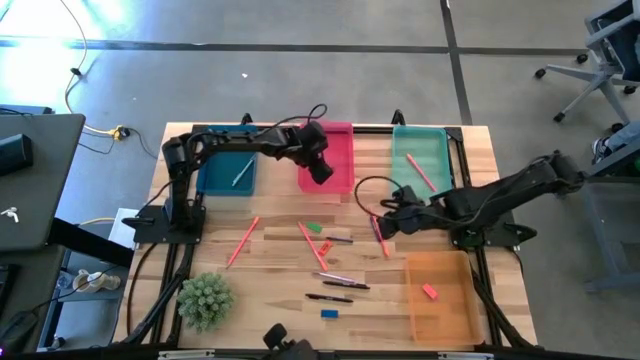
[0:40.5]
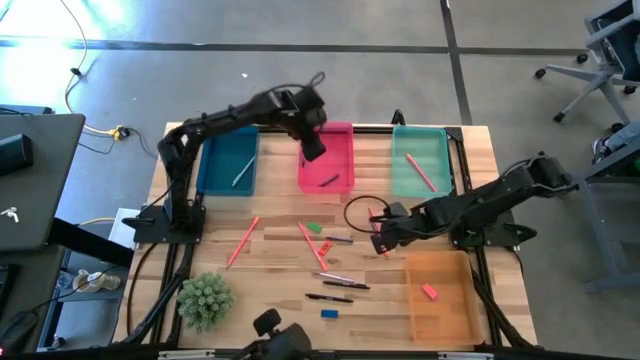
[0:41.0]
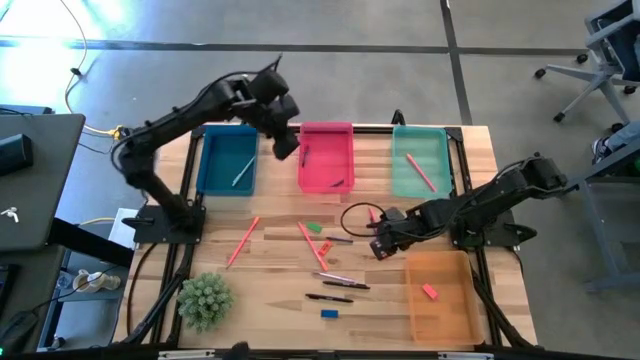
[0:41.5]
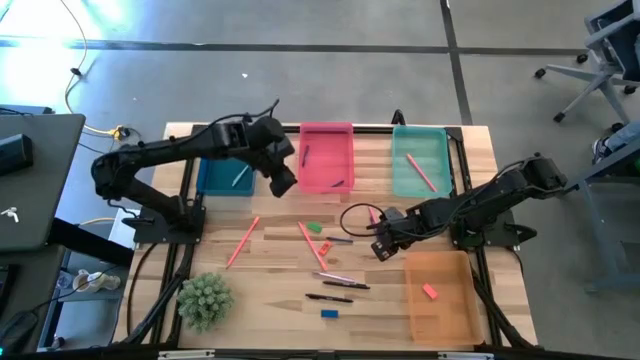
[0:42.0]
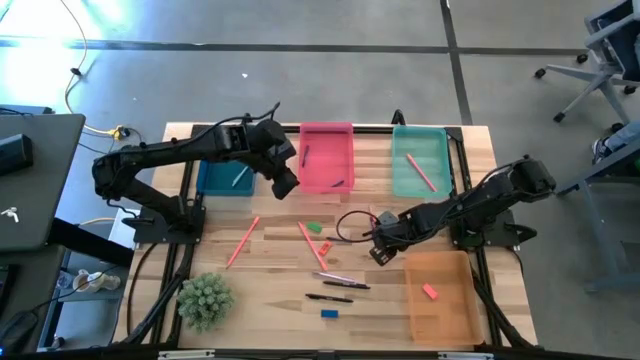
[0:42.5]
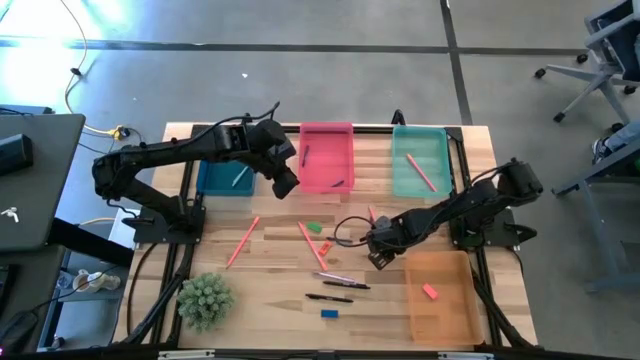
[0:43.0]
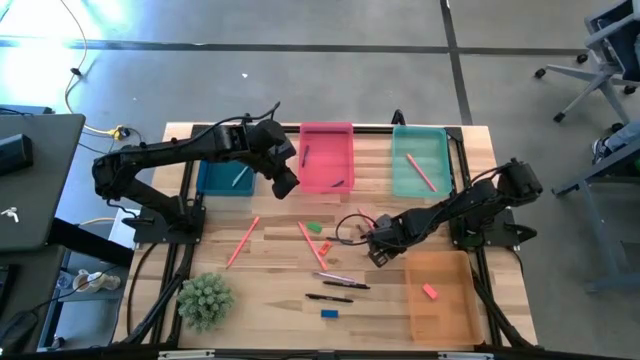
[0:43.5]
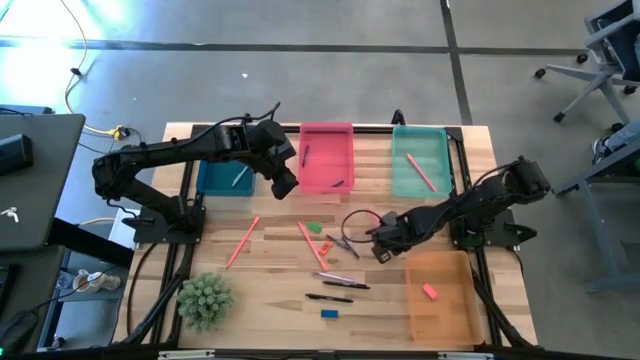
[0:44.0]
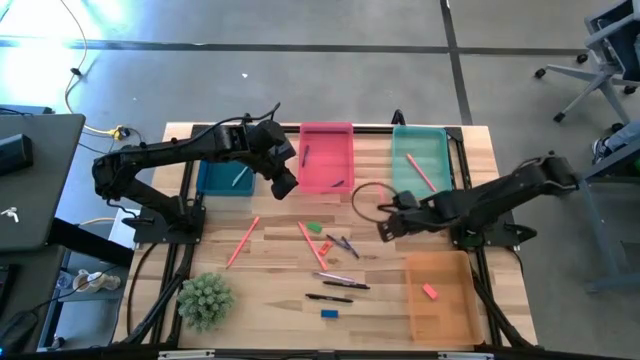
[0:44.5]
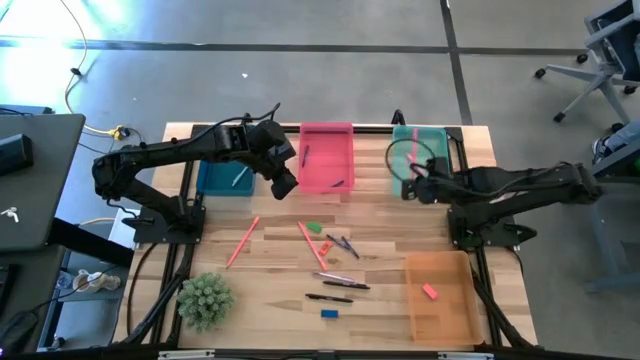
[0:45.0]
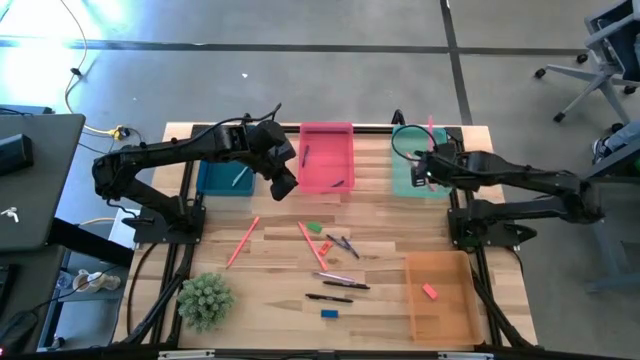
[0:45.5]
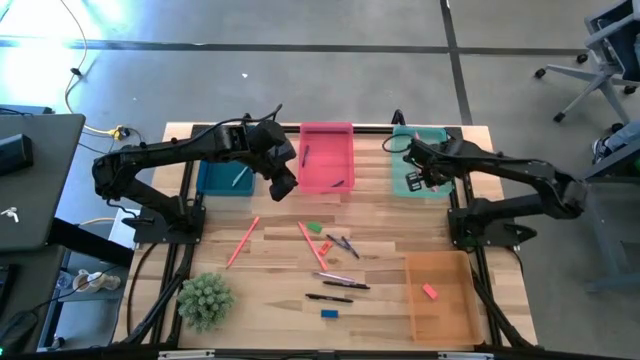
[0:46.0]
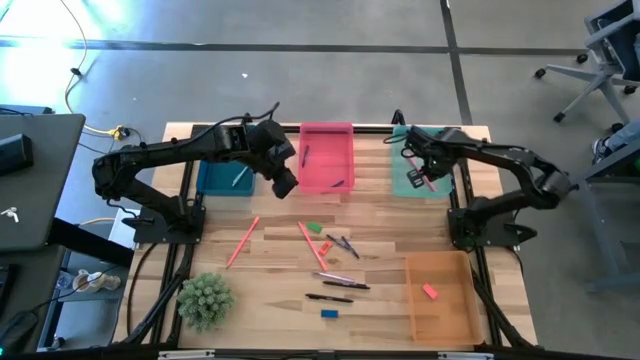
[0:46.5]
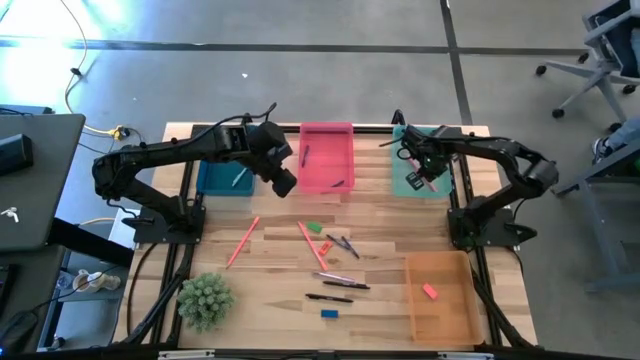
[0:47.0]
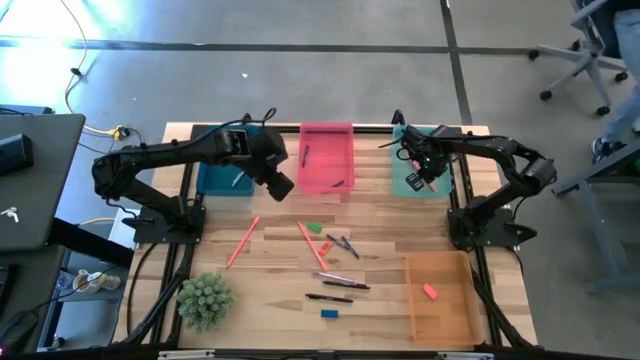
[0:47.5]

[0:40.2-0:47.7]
Task: Sort crayons/erasers/pens/pencils in bins
Put the pink pencil into the green bin

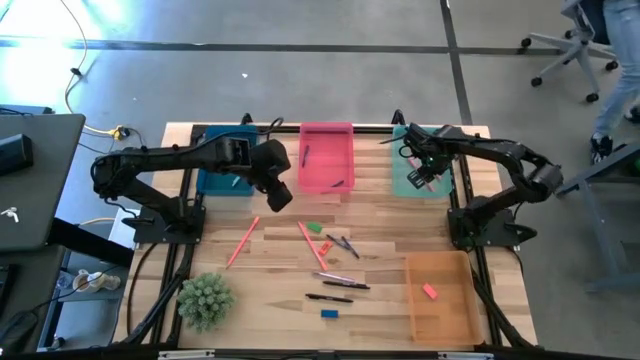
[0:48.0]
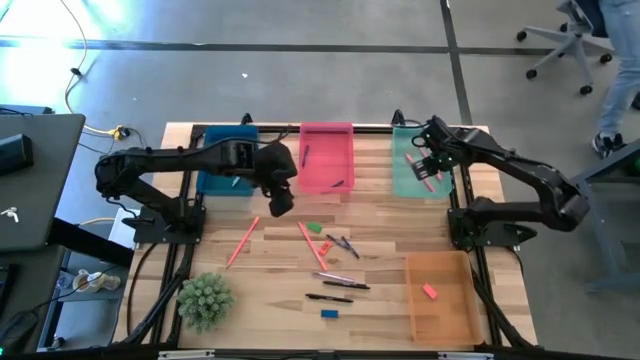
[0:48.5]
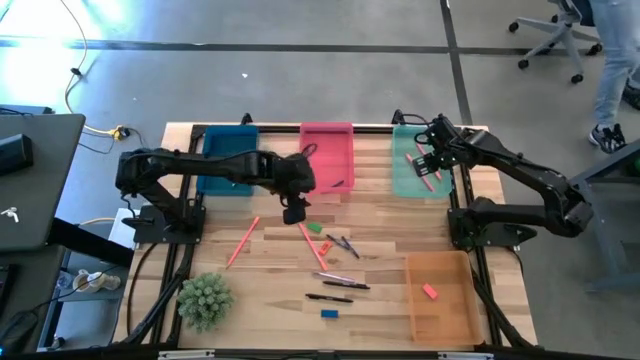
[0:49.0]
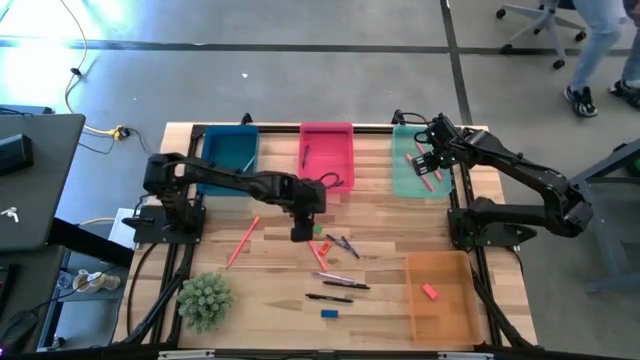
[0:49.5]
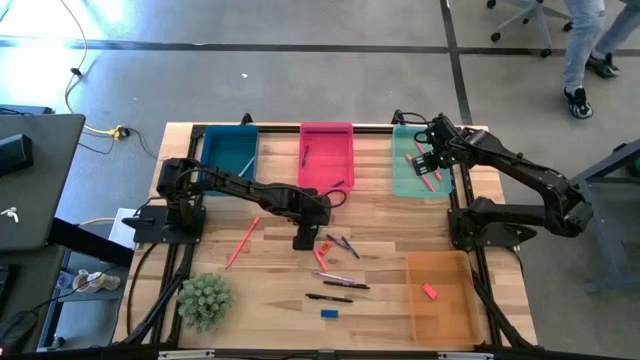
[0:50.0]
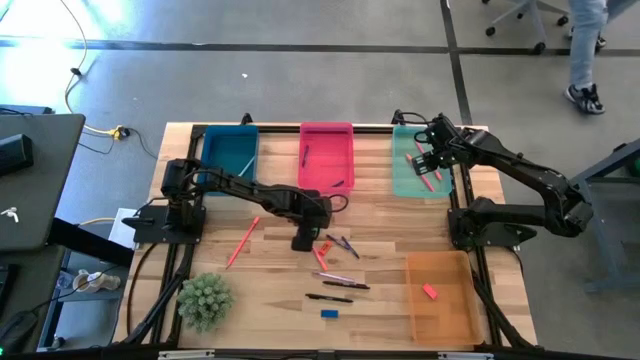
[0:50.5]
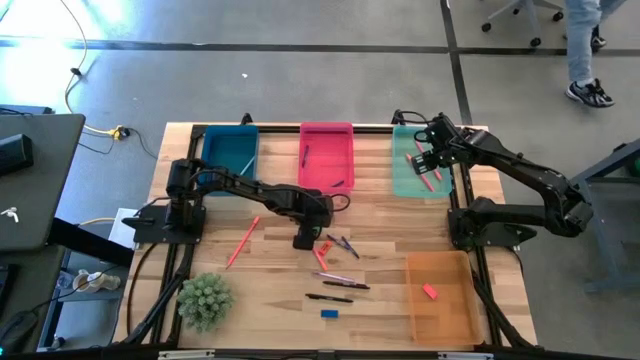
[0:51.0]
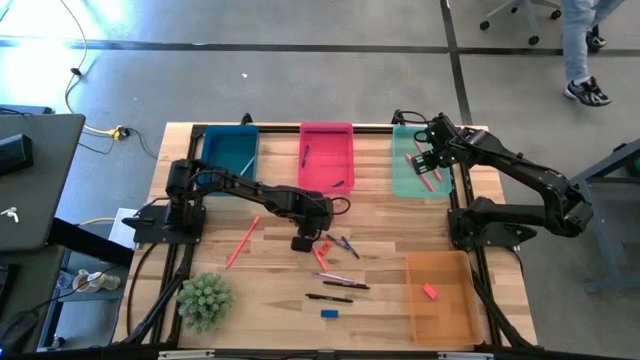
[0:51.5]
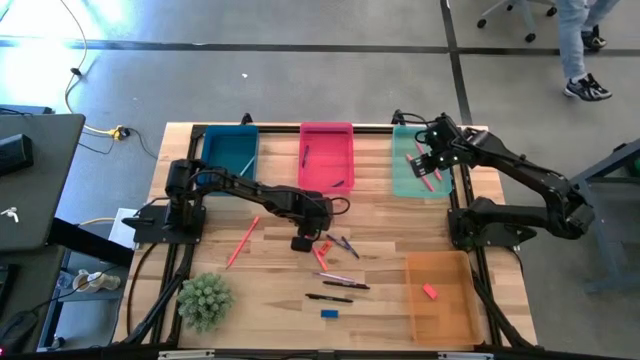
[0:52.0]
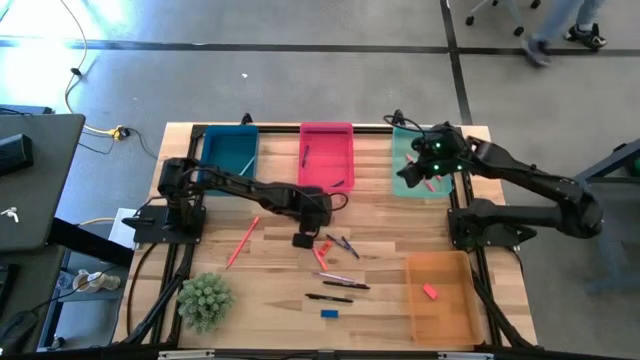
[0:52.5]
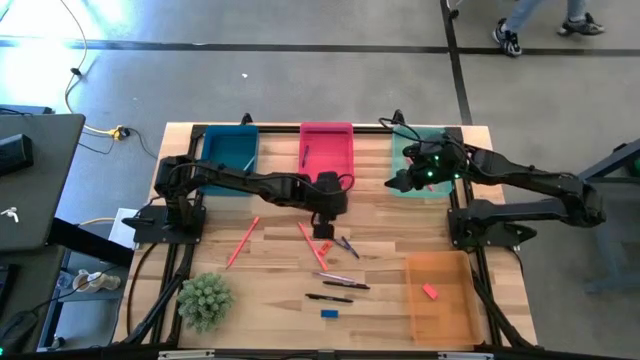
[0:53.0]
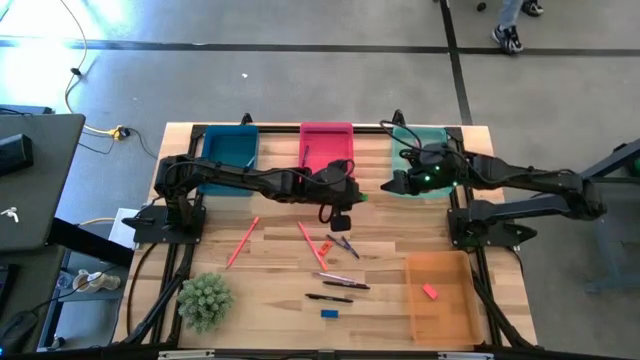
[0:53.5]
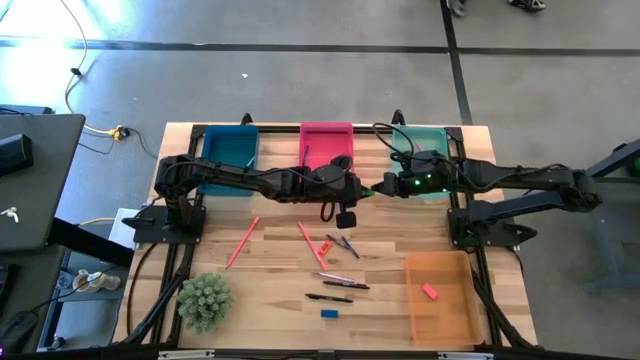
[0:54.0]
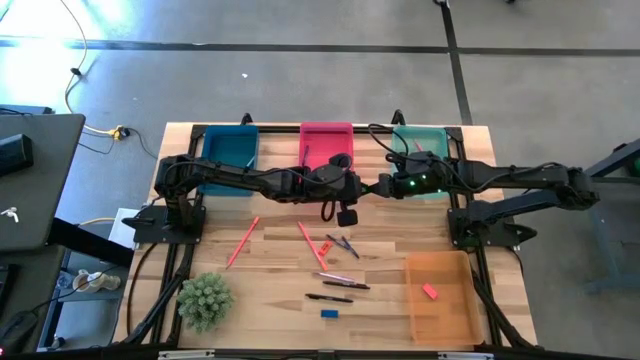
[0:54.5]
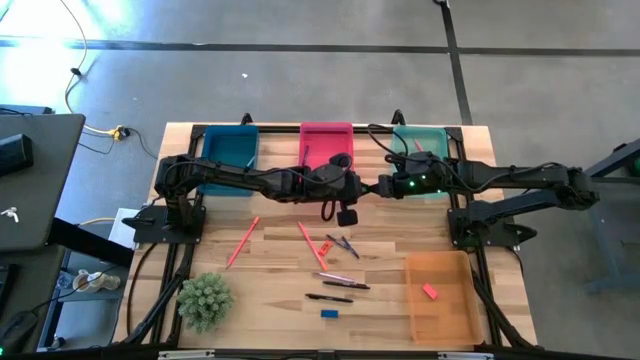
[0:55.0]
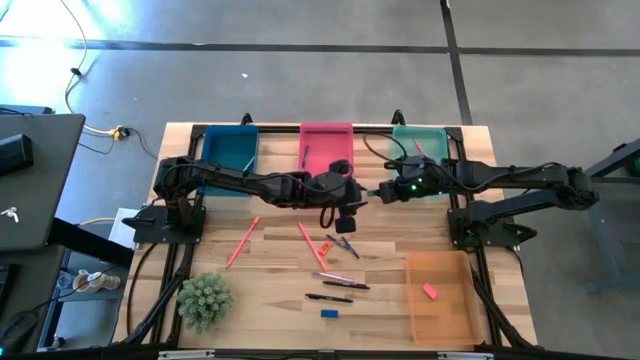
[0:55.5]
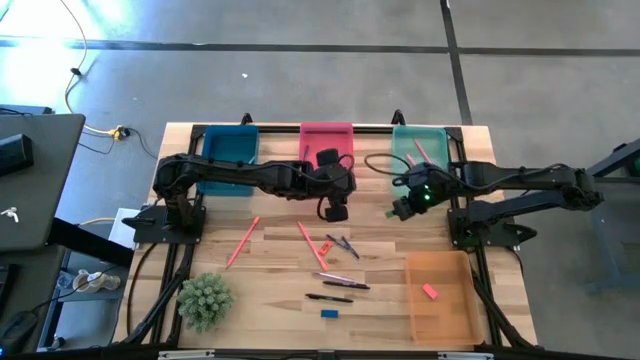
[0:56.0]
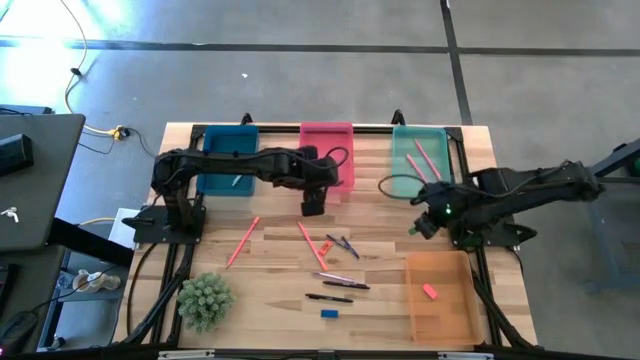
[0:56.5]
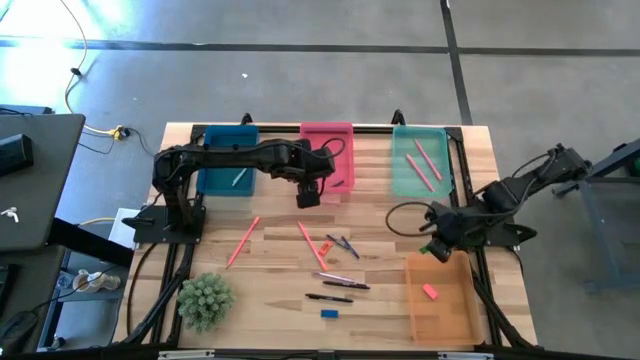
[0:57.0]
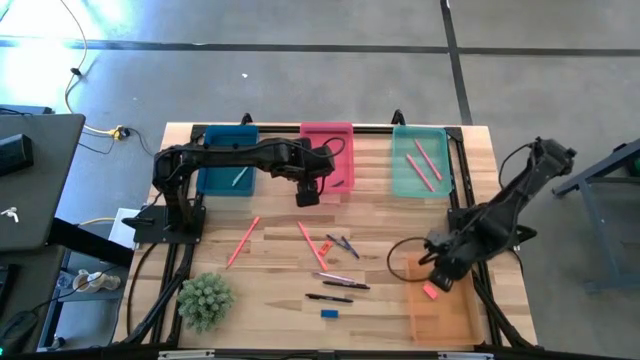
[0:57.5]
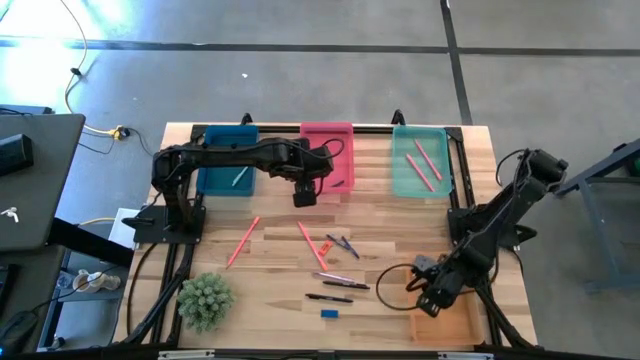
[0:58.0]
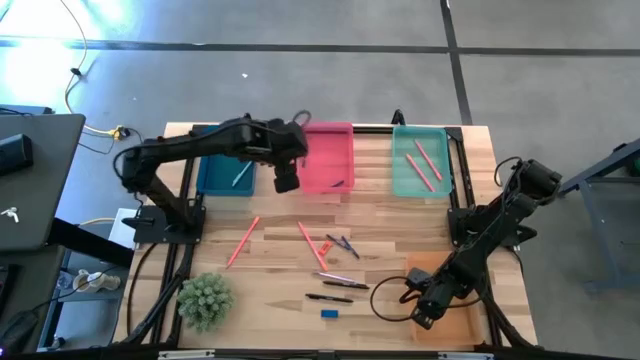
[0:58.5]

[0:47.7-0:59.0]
Put the green eraser into the orange bin

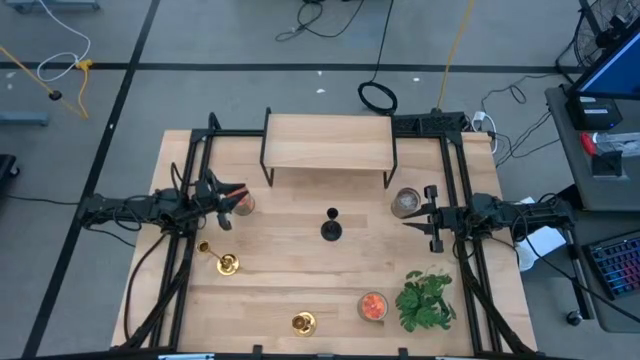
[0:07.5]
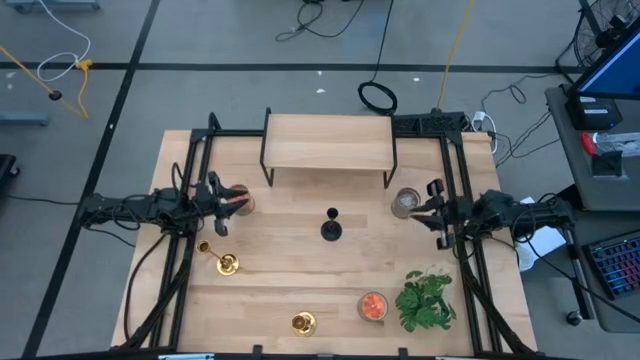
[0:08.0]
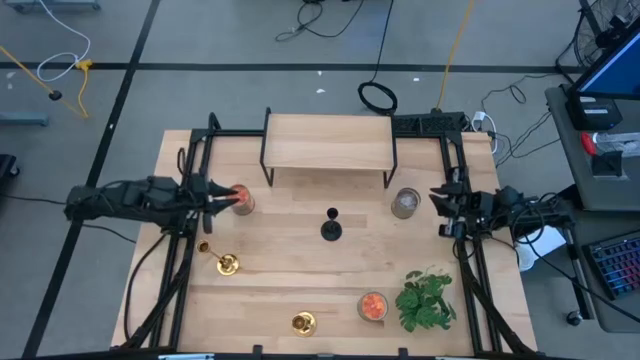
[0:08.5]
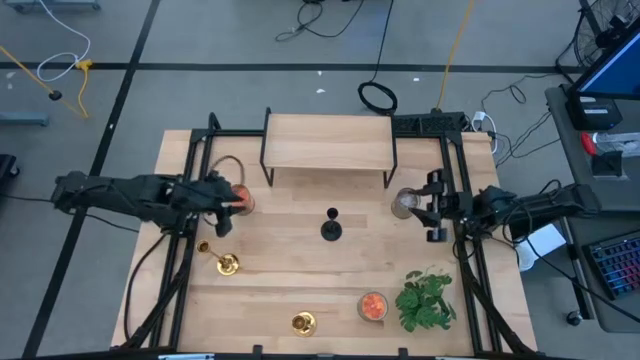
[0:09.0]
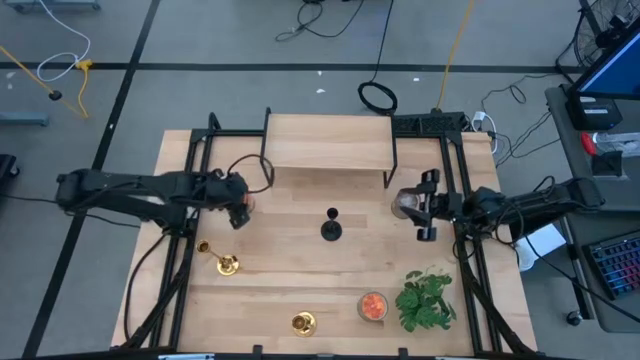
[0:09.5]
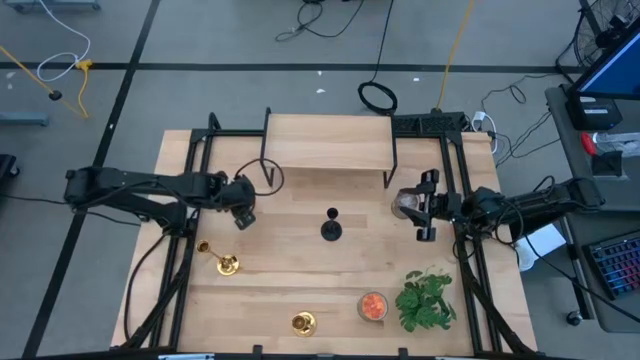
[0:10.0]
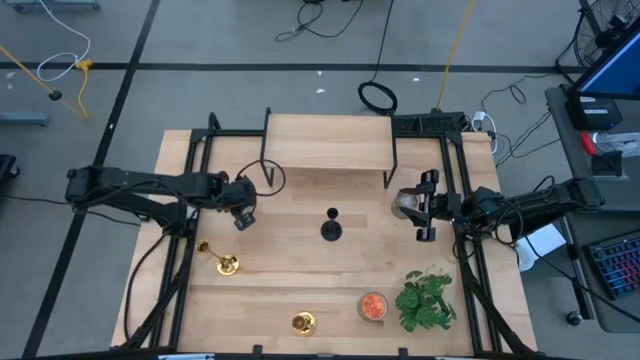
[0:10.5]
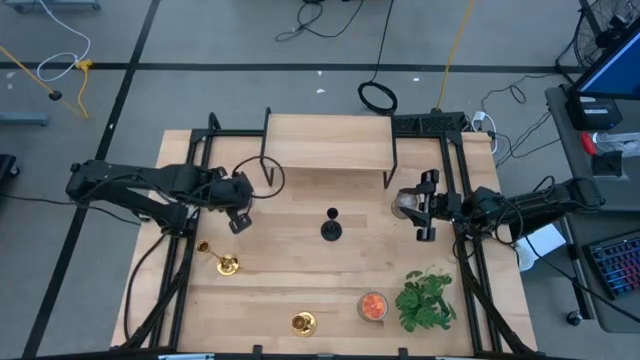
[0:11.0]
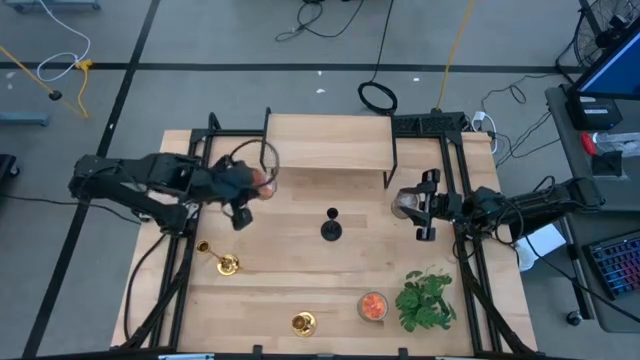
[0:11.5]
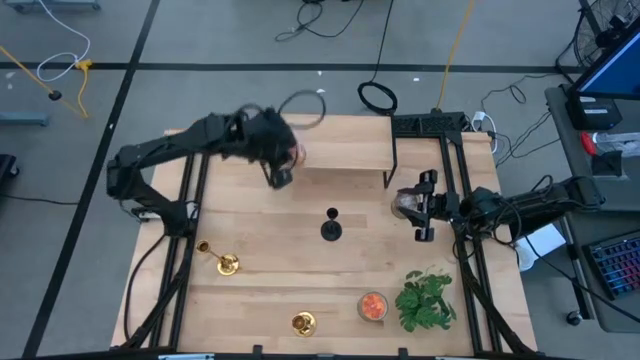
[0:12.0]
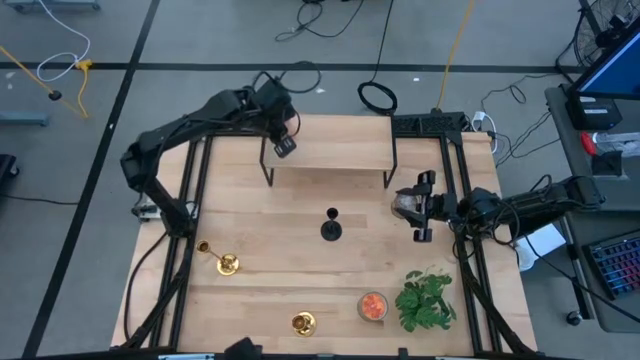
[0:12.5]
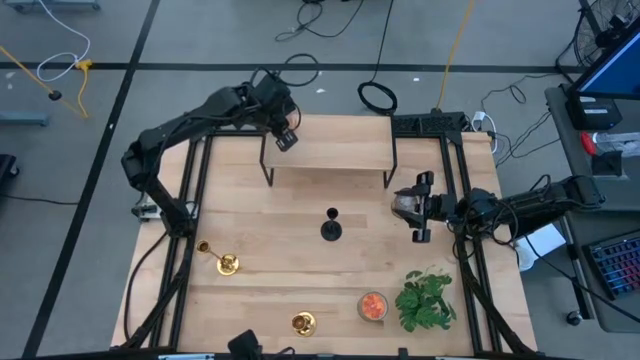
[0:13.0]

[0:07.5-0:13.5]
Task: Pick & Place candle stick holders
Put the top orange scented candle on the shelf
